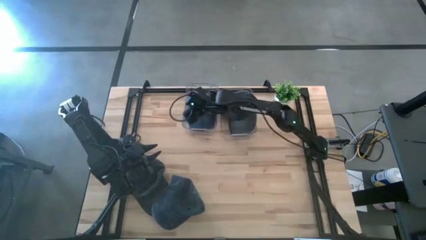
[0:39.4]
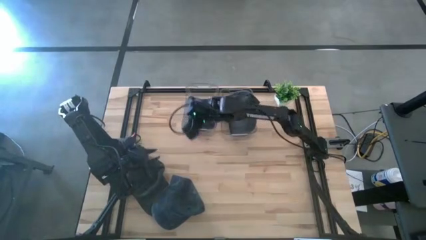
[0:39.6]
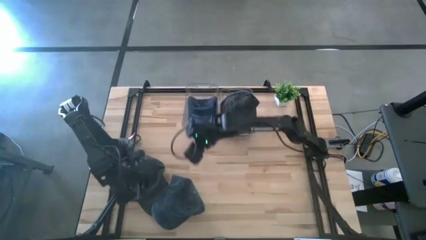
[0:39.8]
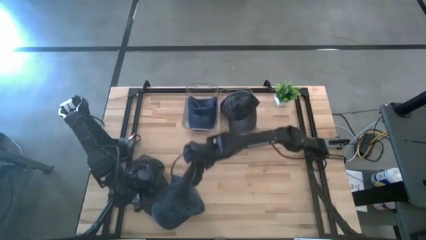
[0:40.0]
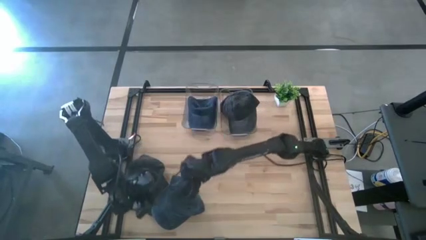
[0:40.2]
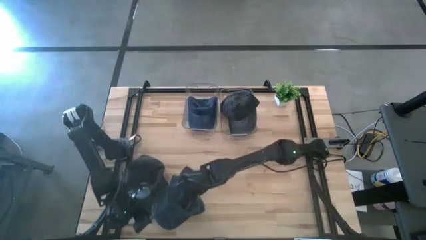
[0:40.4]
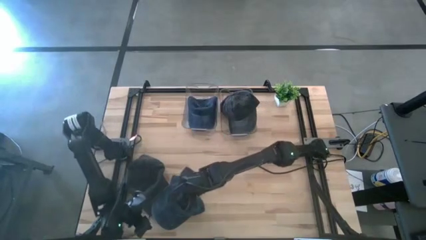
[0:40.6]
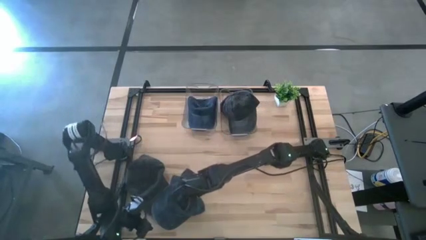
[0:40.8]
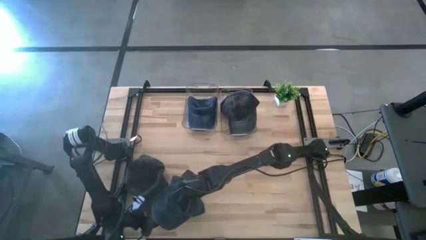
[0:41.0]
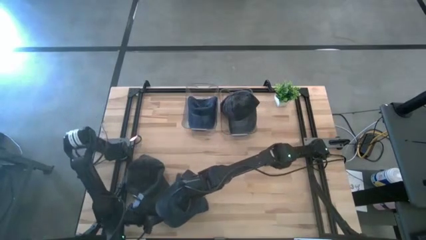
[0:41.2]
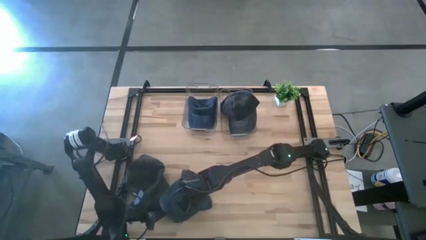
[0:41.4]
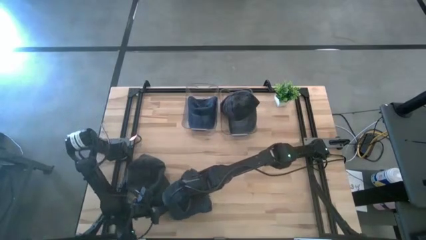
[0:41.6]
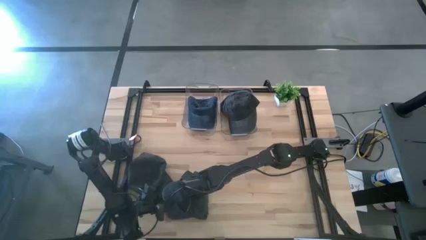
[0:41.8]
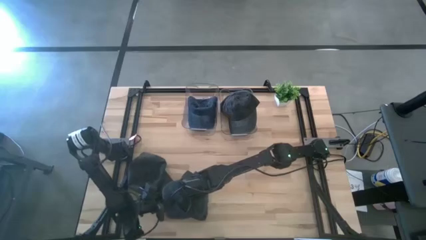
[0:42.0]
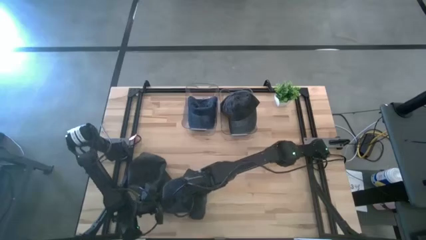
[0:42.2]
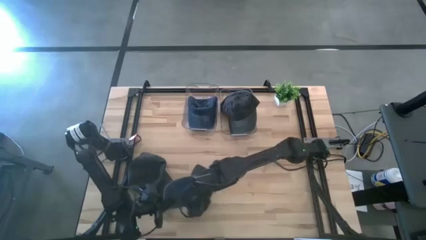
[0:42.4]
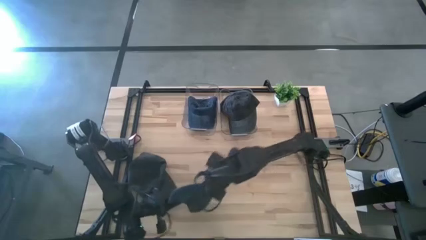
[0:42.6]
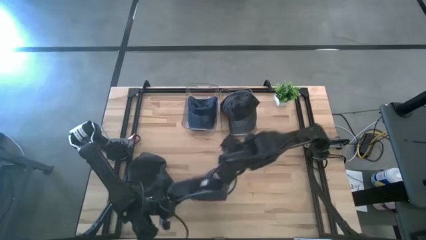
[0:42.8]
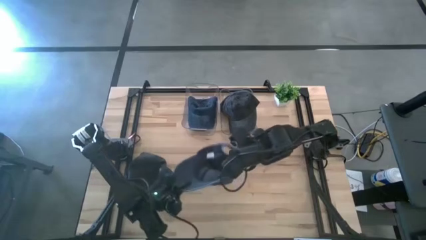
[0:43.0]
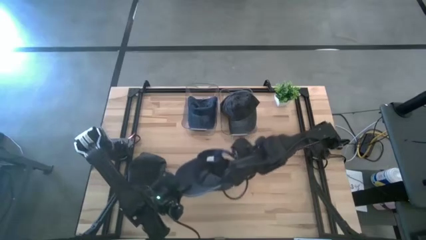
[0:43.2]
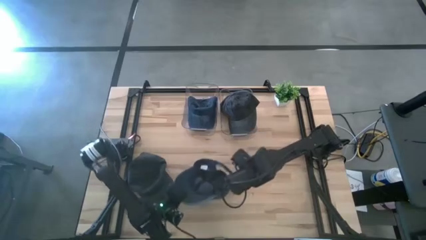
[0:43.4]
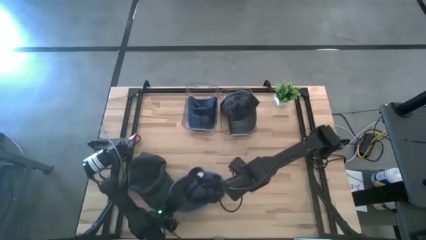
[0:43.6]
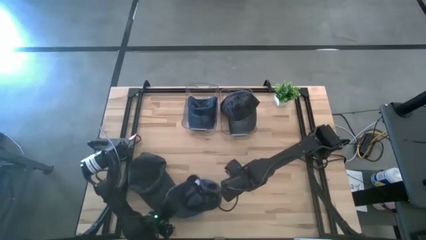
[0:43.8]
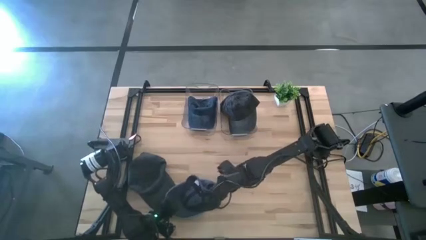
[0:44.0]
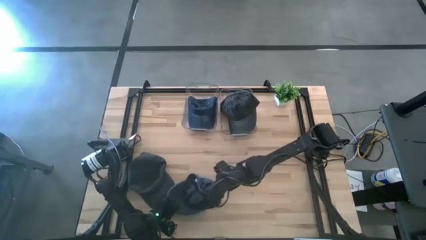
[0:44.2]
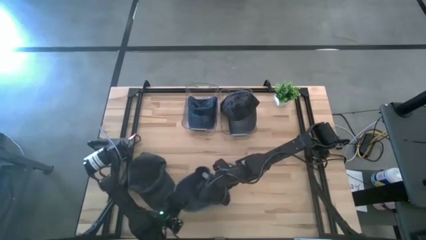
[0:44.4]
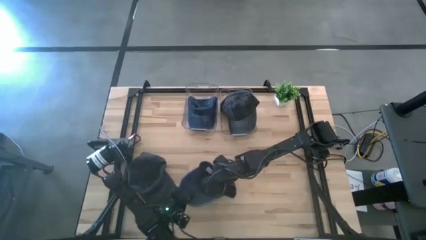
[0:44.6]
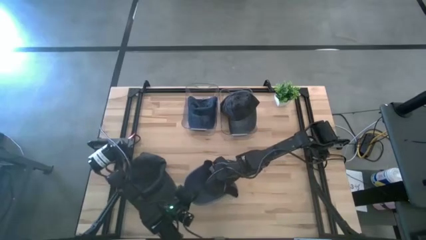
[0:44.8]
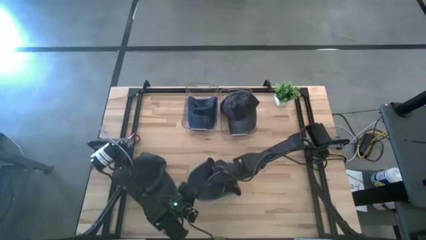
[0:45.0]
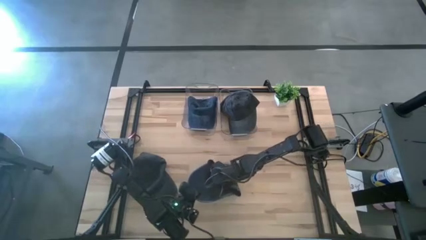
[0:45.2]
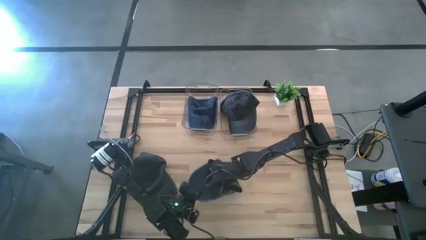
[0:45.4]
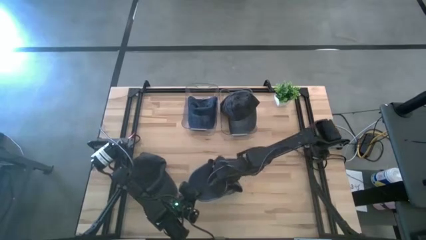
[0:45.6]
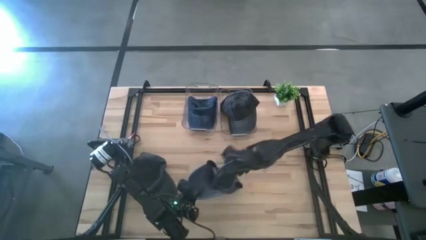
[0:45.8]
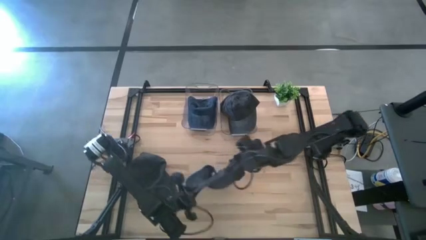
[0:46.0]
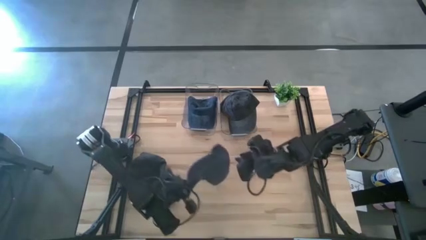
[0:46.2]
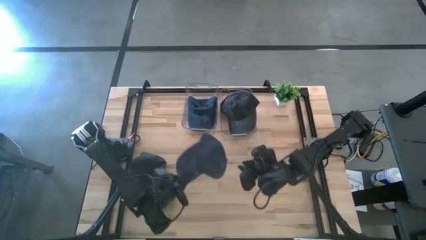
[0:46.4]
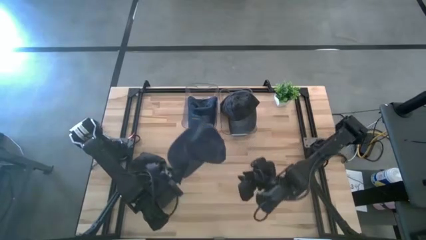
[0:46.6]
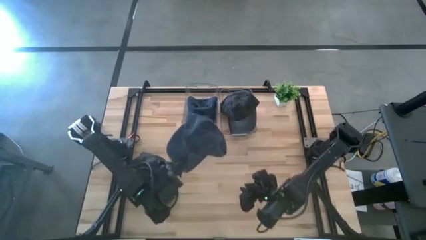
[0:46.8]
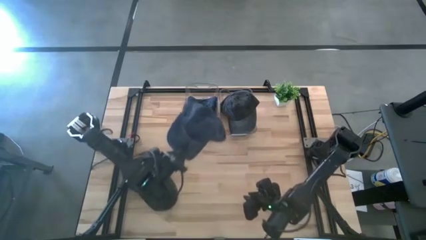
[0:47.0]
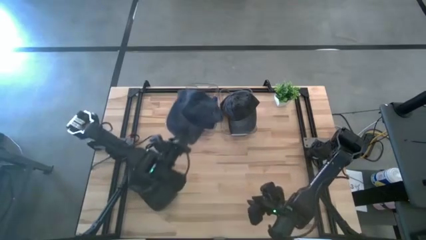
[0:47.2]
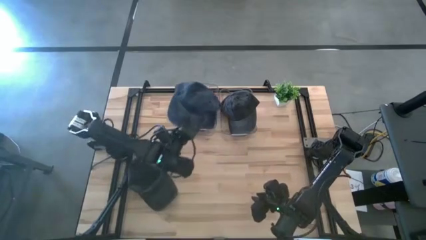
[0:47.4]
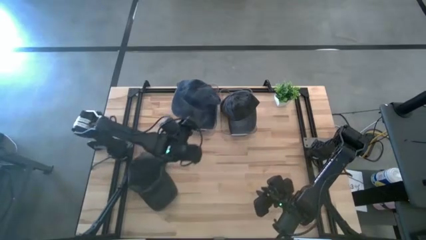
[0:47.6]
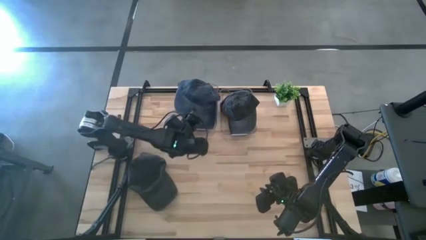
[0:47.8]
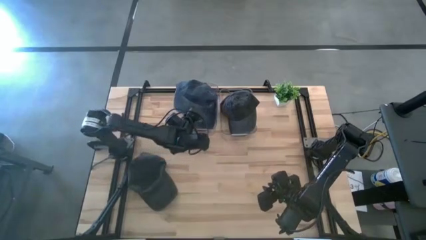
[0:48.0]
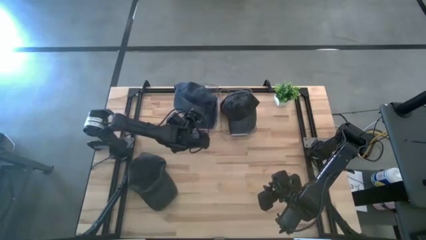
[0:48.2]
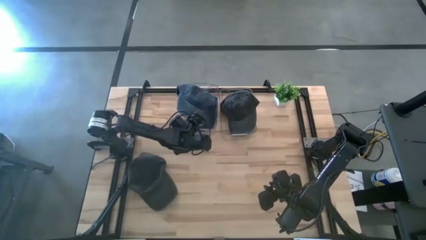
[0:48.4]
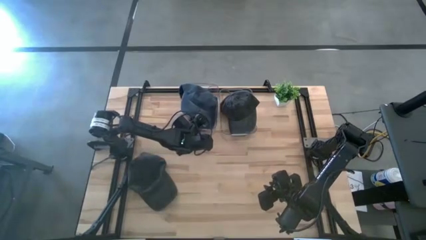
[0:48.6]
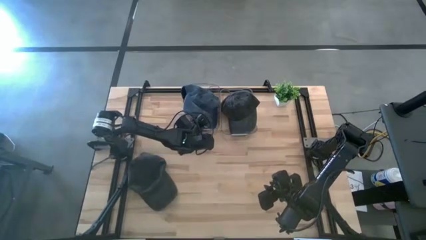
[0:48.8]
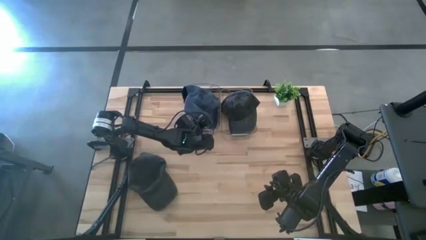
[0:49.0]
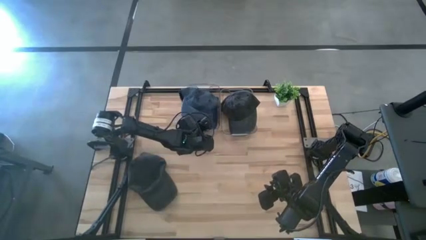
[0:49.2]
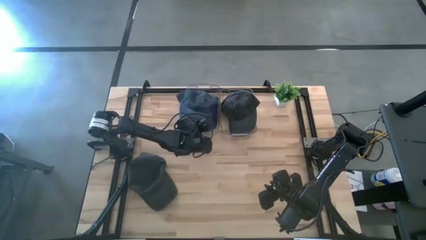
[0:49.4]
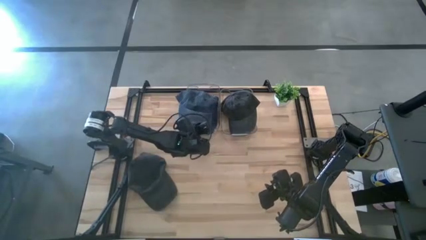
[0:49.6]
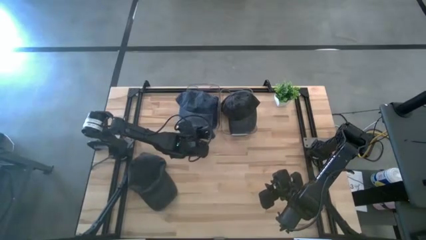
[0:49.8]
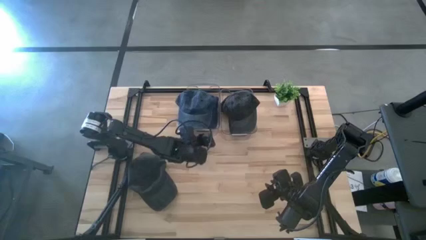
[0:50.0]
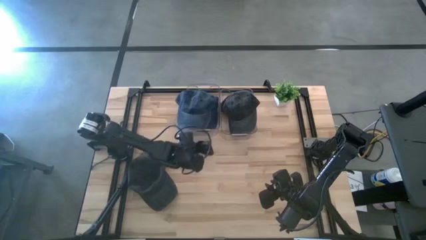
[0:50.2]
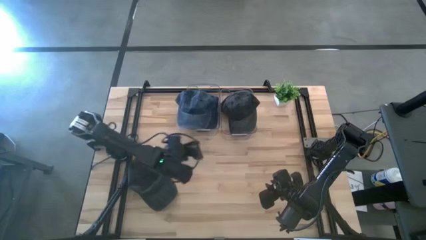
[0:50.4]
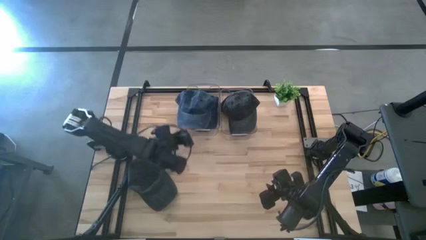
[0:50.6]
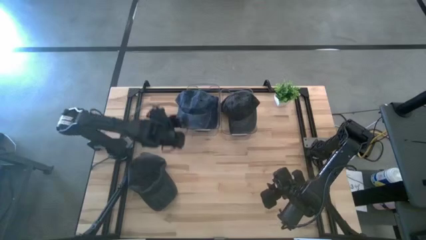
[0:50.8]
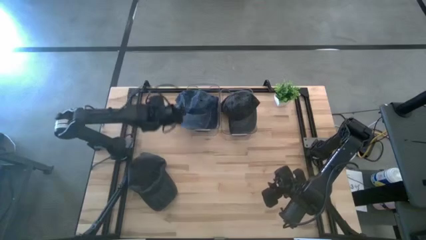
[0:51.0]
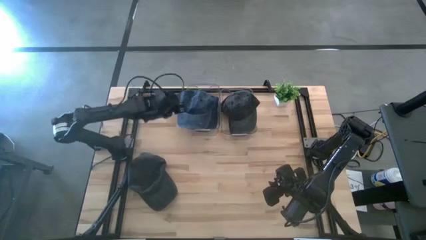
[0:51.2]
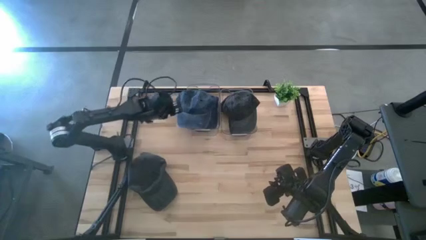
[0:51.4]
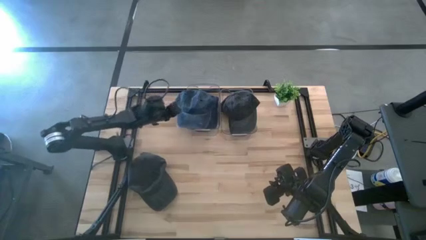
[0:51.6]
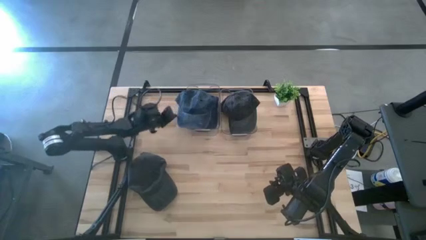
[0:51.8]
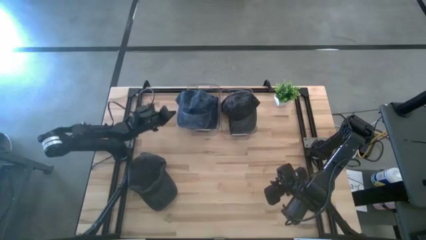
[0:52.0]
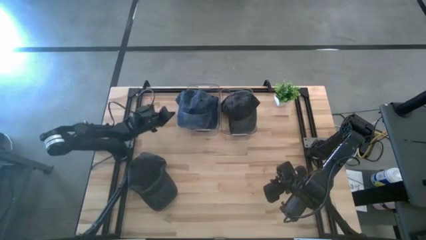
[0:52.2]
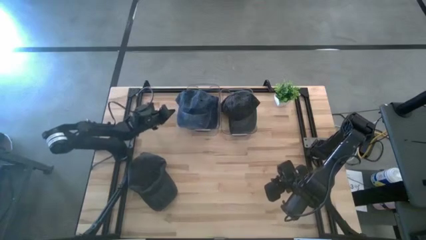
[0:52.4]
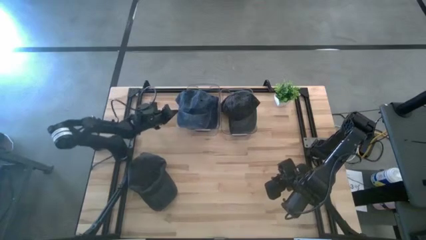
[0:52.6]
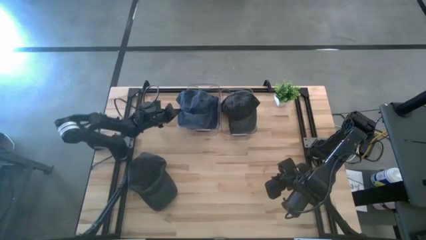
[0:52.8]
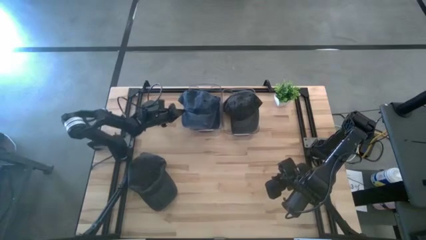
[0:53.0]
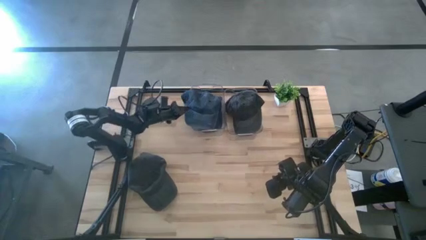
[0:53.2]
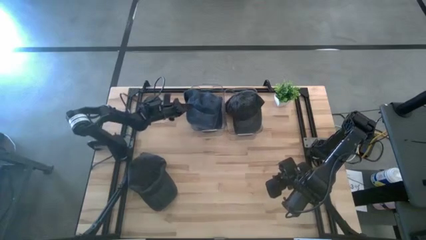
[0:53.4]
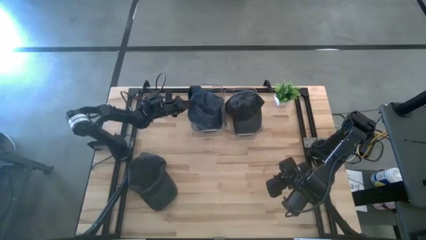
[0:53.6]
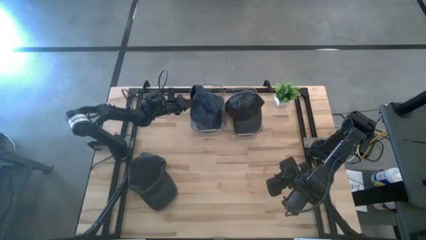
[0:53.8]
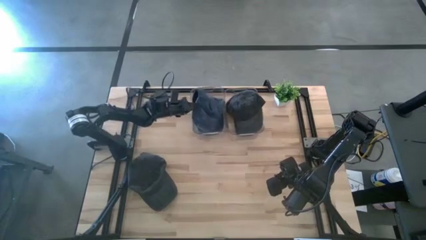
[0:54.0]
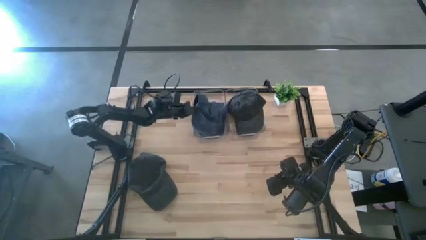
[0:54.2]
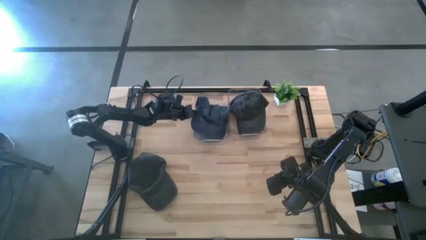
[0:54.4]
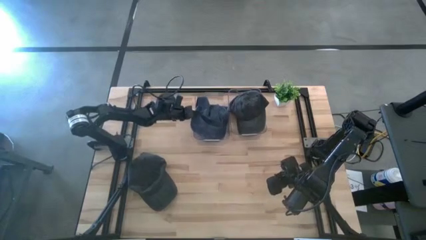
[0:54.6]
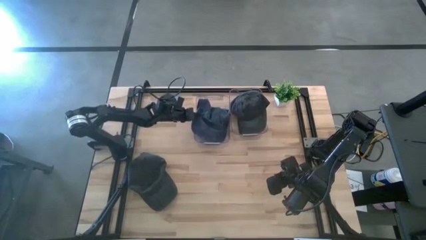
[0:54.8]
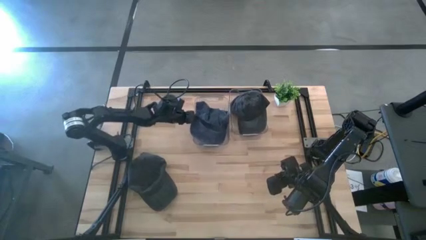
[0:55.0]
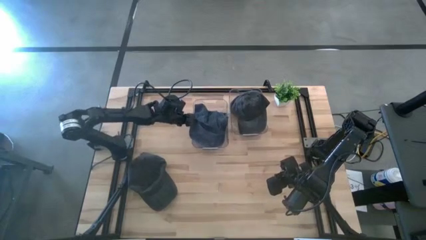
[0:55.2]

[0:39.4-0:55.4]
Task: Pick & Place hat
Put the blue cap into the left transparent bin
